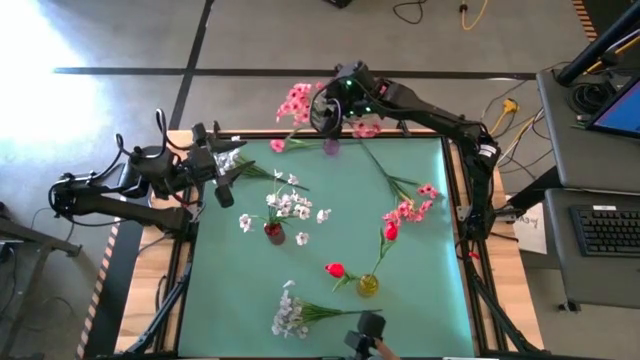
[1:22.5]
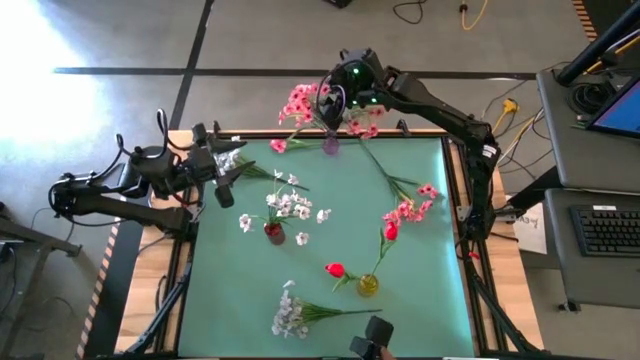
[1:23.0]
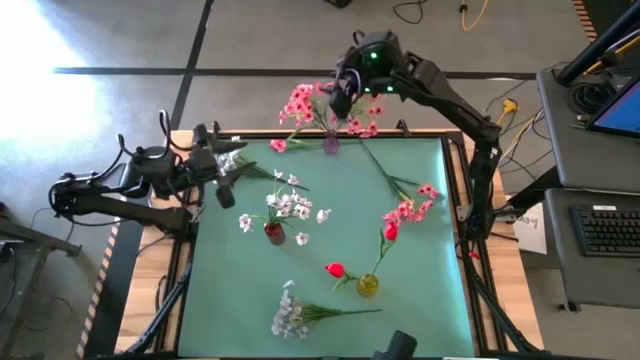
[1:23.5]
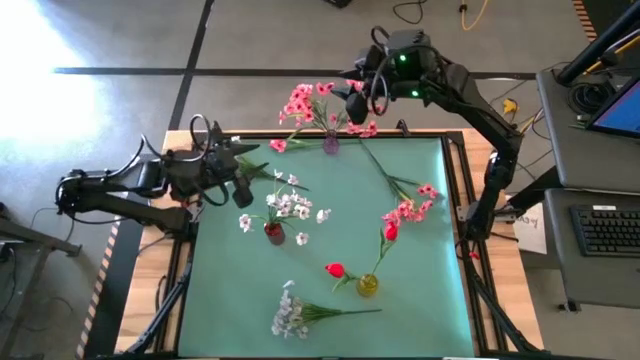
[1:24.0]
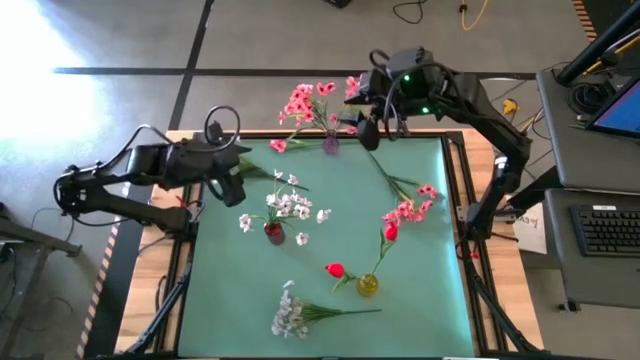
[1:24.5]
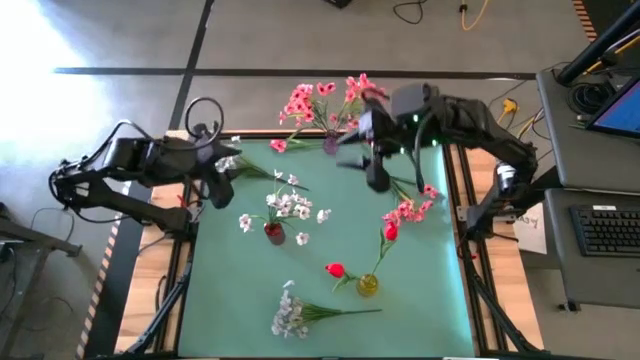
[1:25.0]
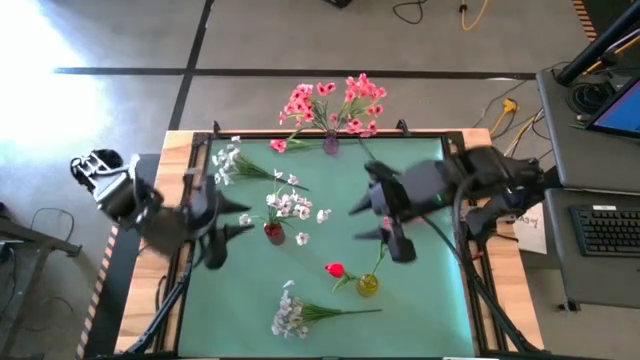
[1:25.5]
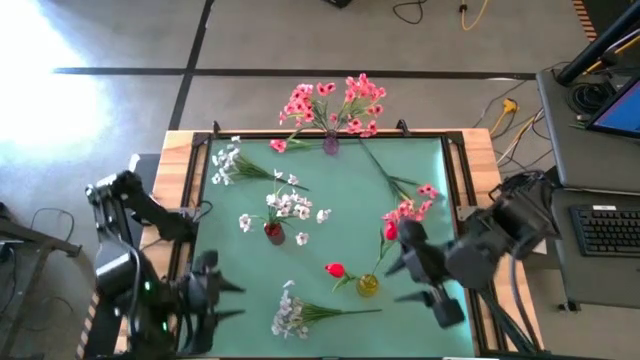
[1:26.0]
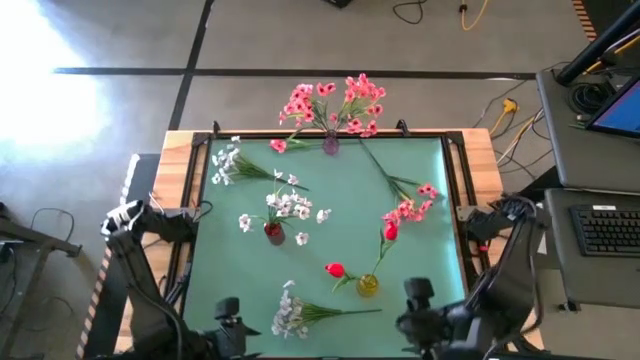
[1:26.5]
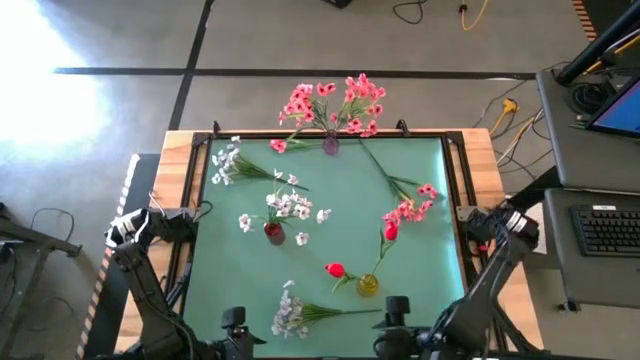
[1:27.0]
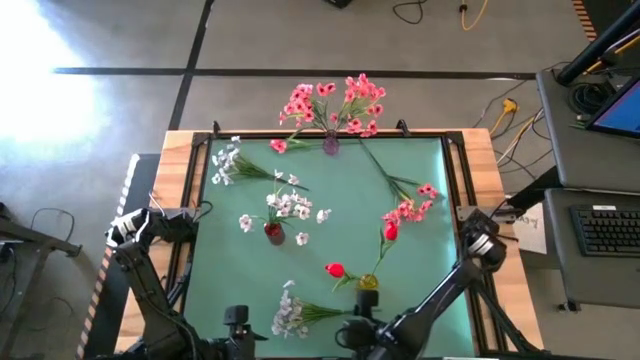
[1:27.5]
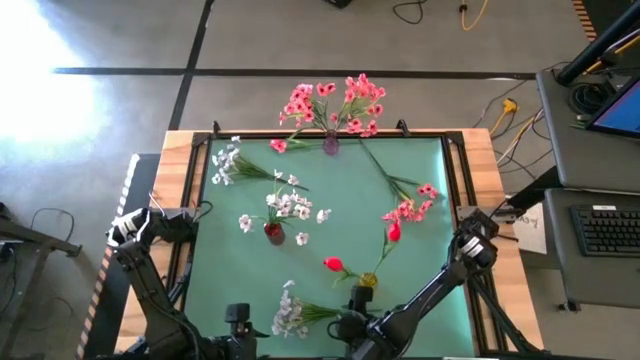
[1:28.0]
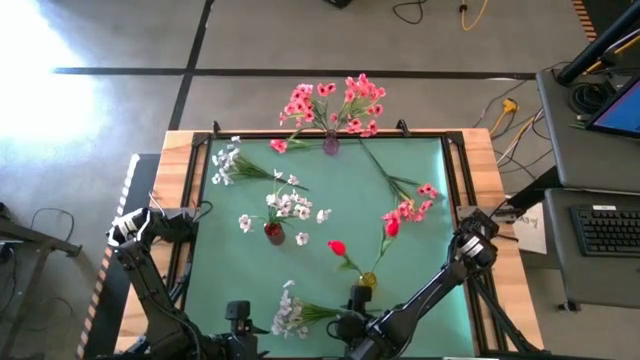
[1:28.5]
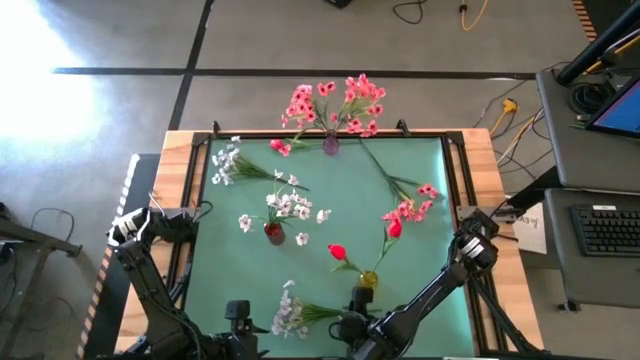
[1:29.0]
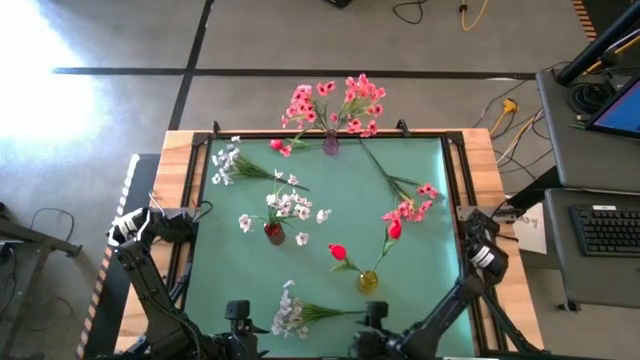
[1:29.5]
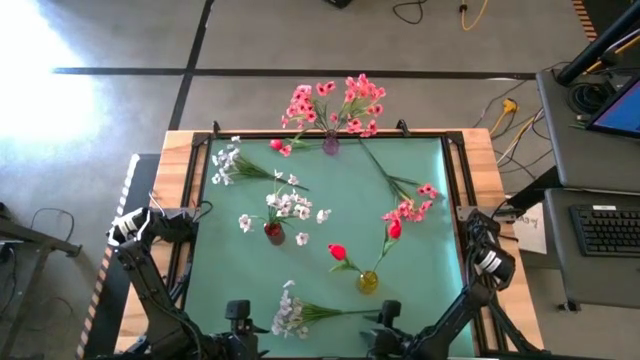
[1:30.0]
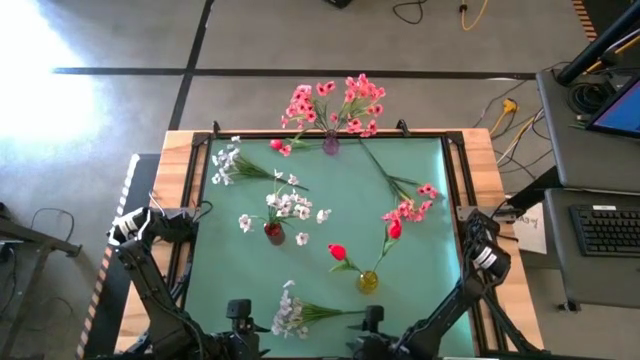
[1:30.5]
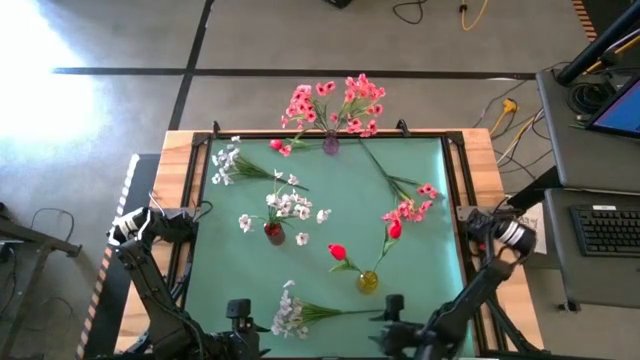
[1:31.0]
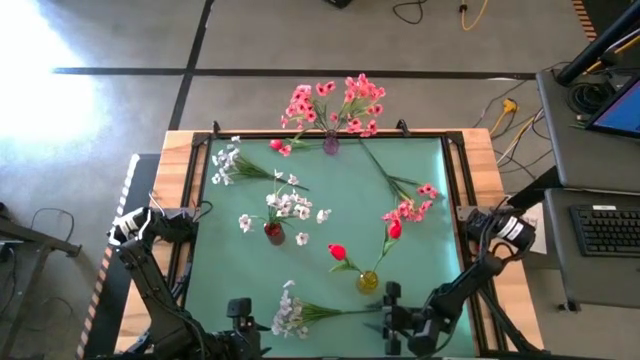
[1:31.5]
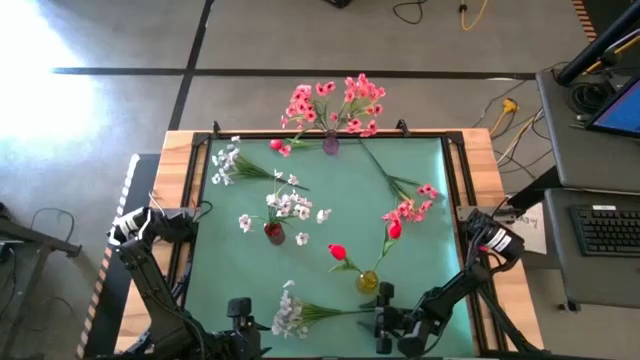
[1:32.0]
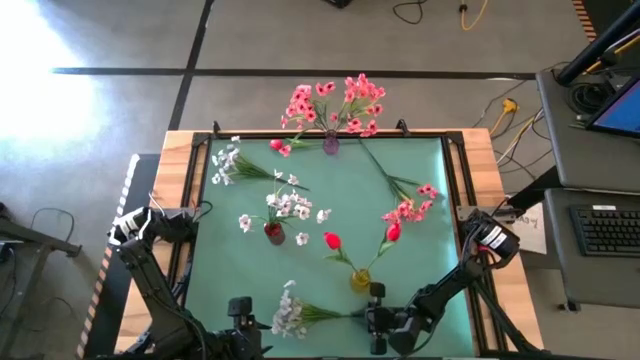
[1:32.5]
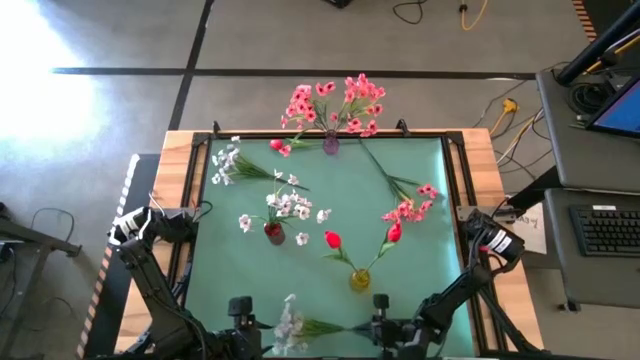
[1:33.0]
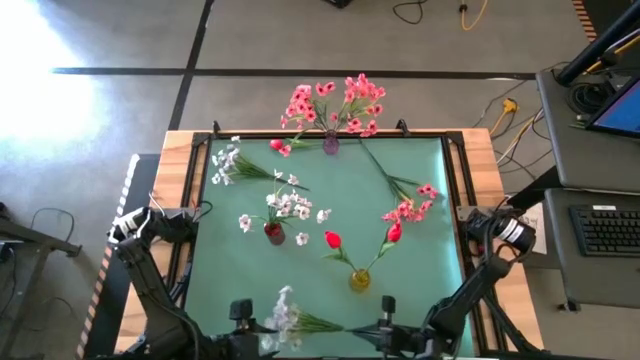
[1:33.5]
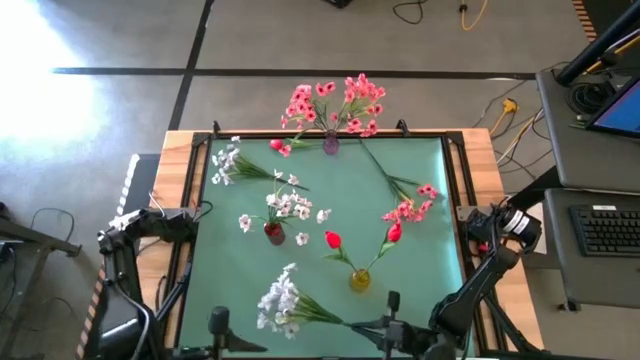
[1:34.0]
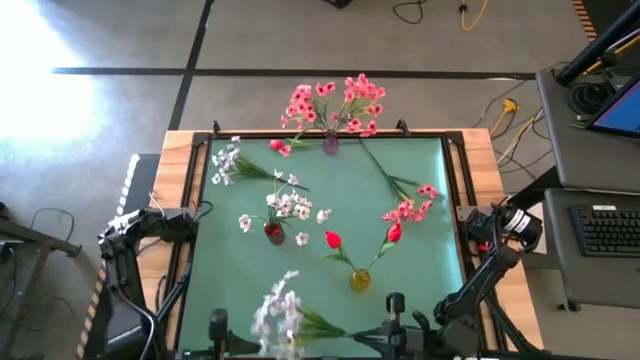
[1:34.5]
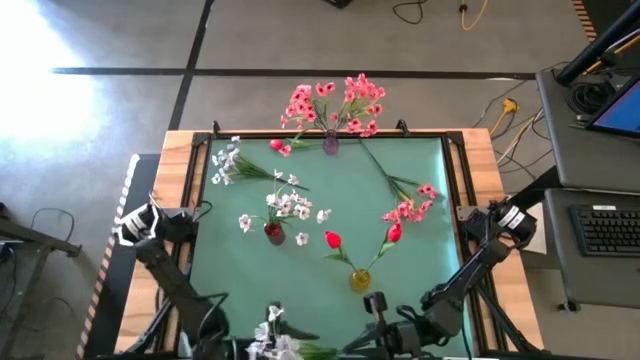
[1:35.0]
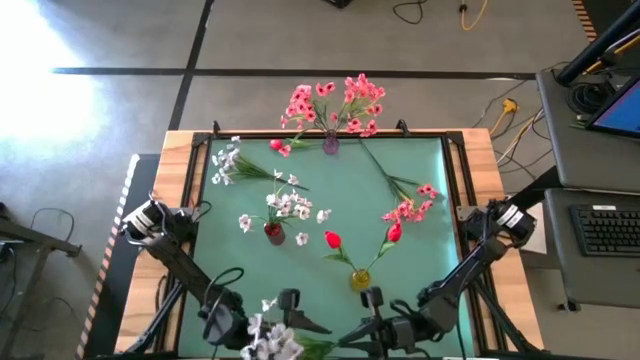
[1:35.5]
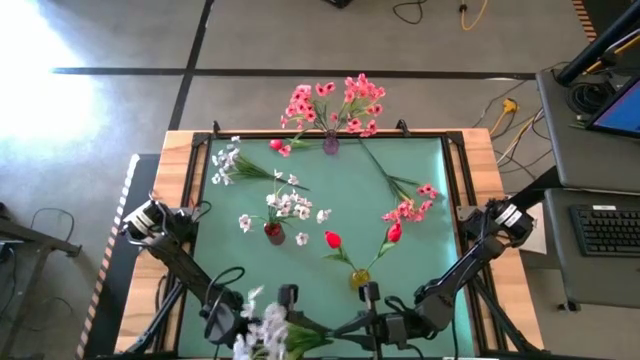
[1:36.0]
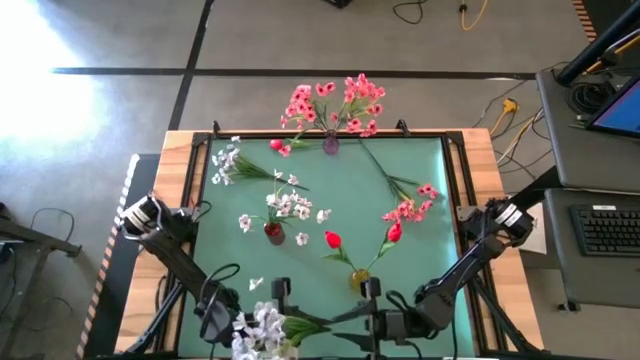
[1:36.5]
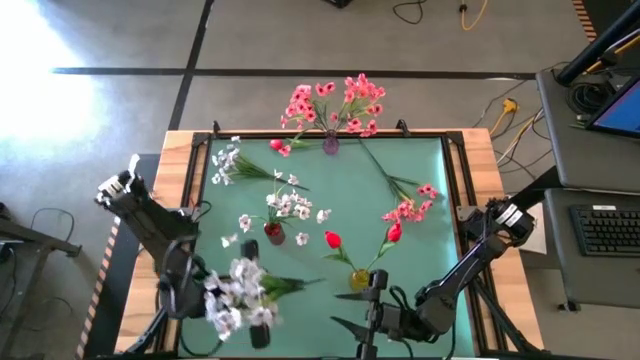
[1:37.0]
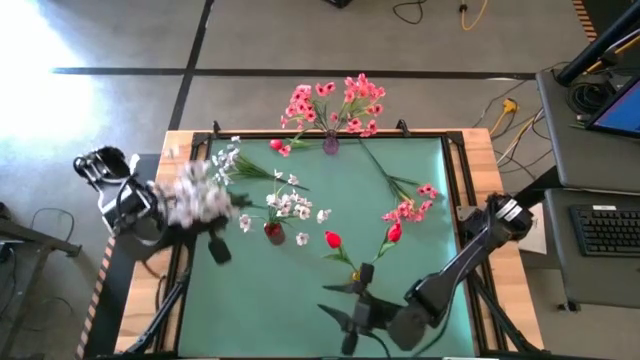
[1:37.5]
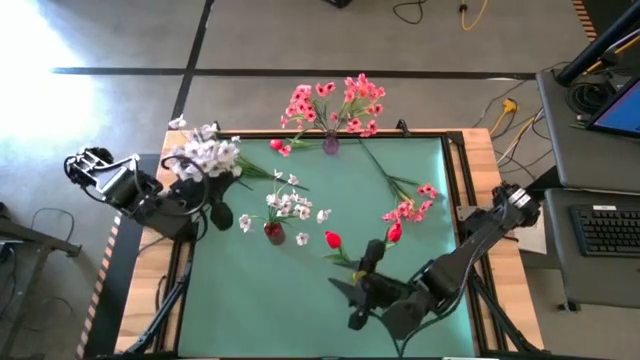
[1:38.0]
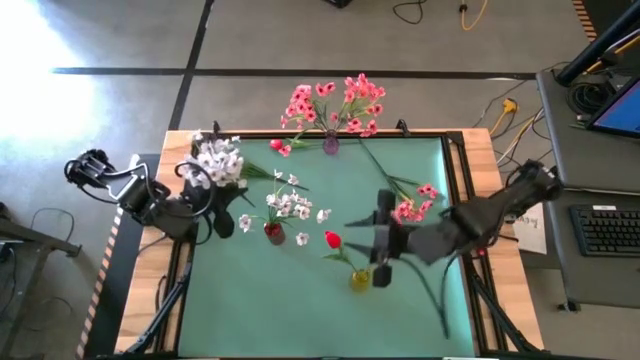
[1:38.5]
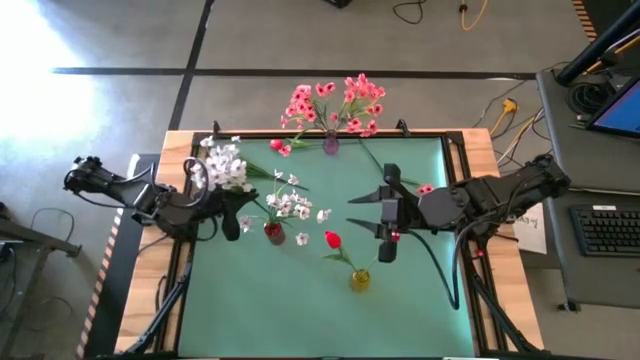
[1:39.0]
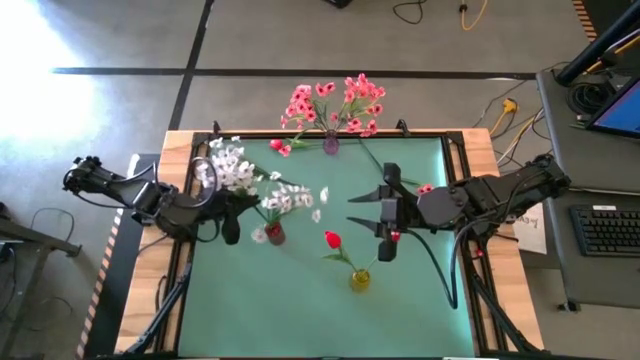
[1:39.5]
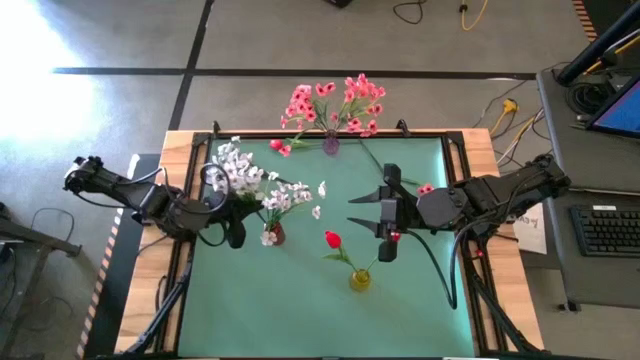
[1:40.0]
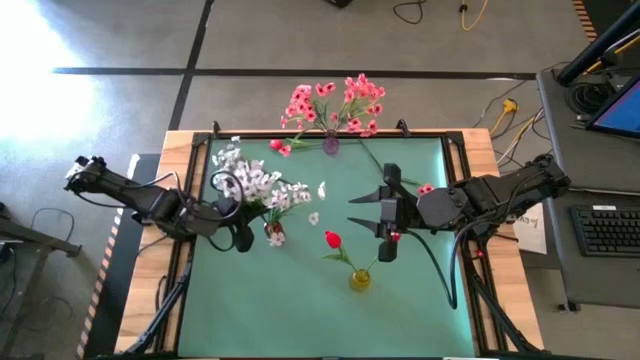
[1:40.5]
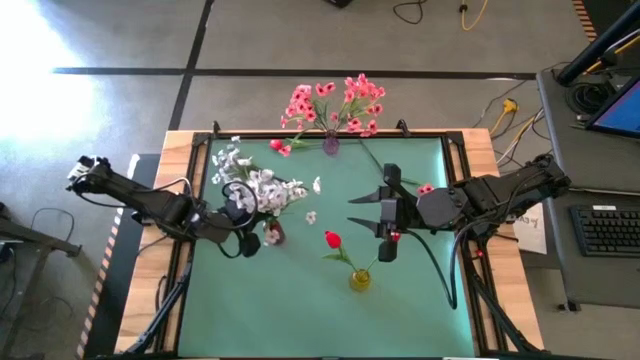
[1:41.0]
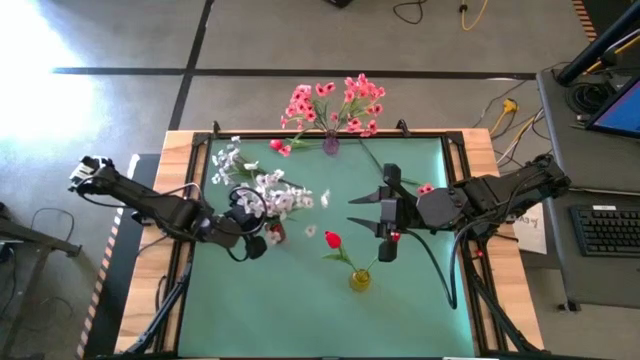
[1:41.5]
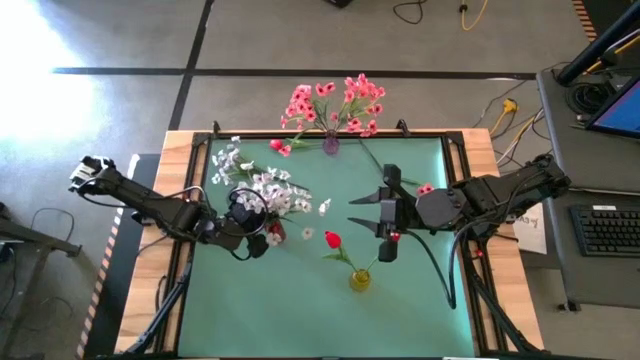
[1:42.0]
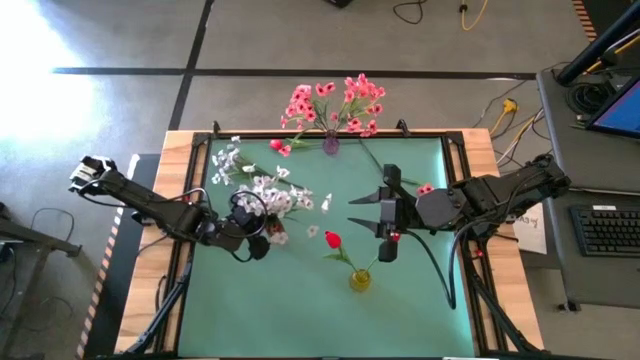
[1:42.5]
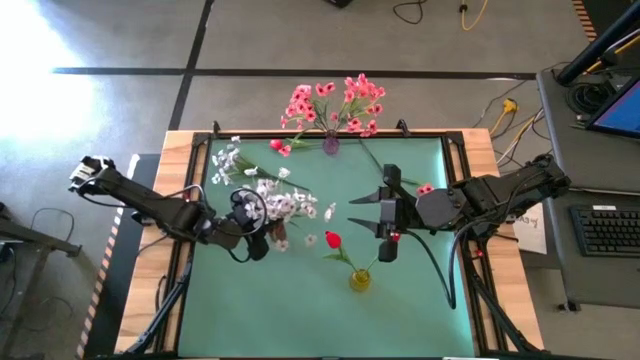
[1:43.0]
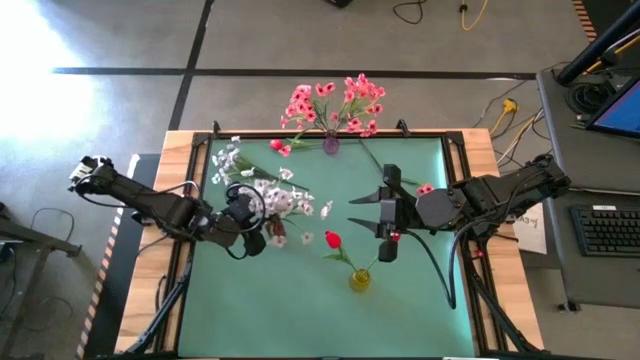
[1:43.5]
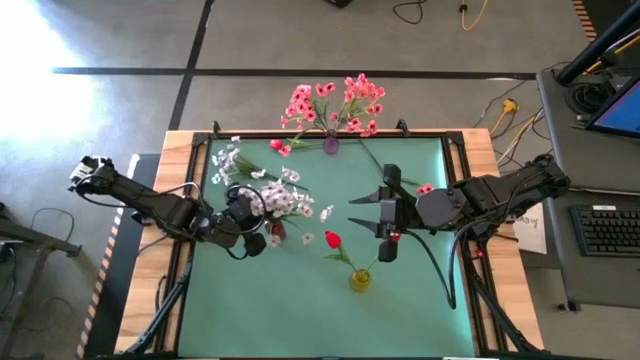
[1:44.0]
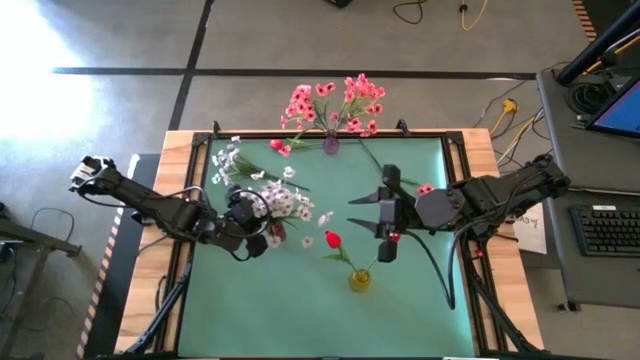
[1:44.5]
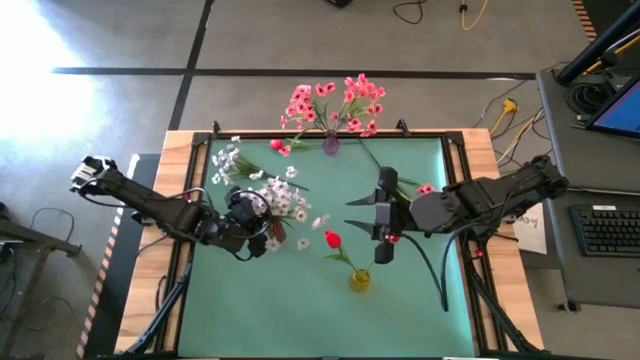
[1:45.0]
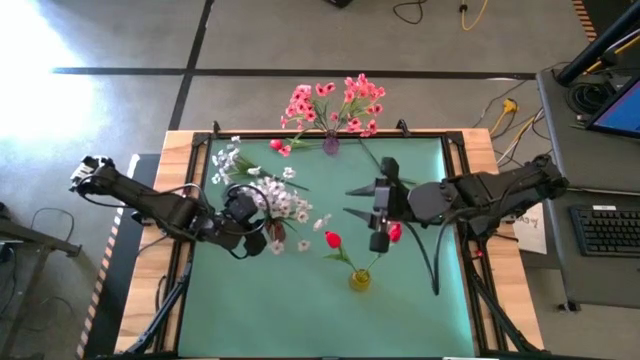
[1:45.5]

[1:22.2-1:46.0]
Task: Sort flowers into vase by color
Put the bottom white flower into the red flower vase
